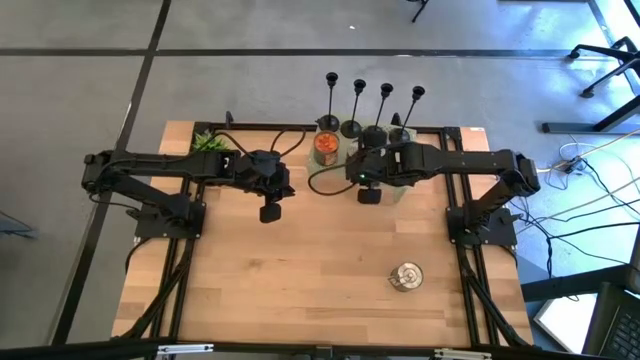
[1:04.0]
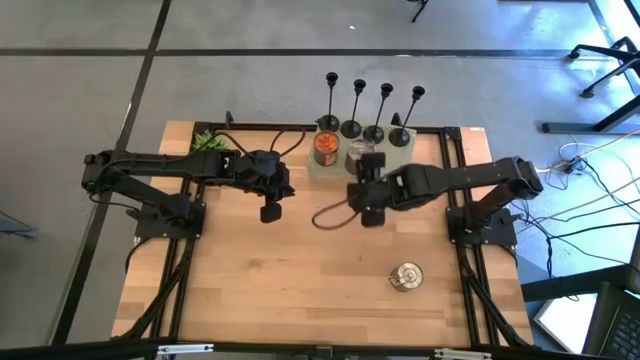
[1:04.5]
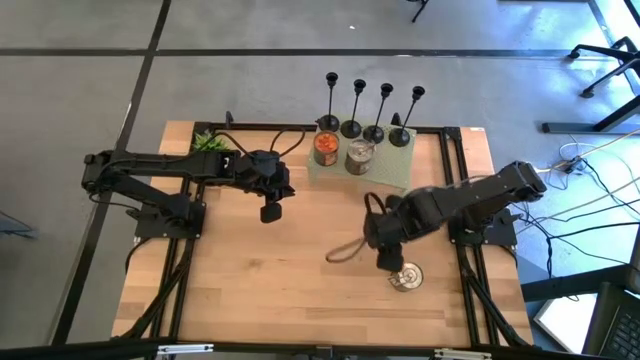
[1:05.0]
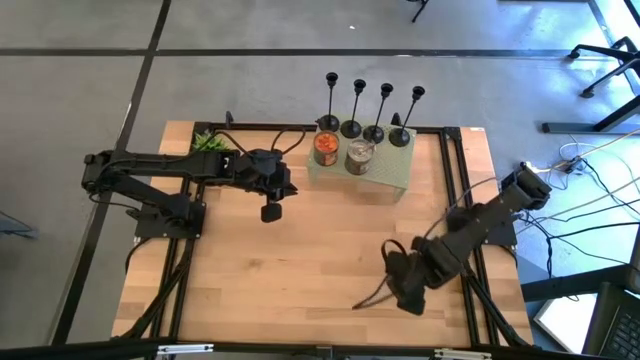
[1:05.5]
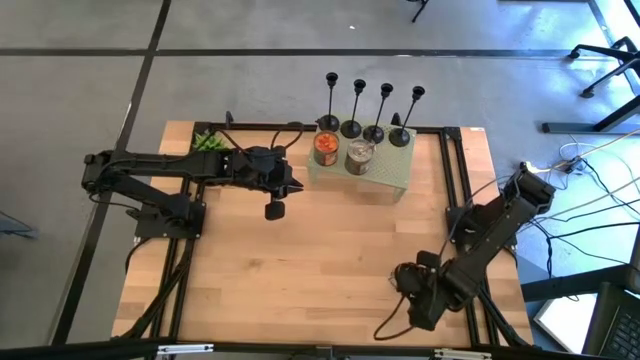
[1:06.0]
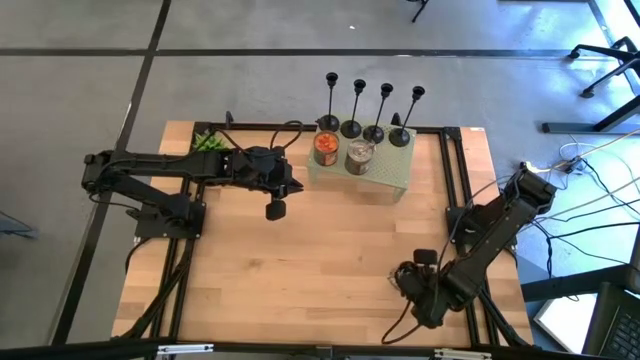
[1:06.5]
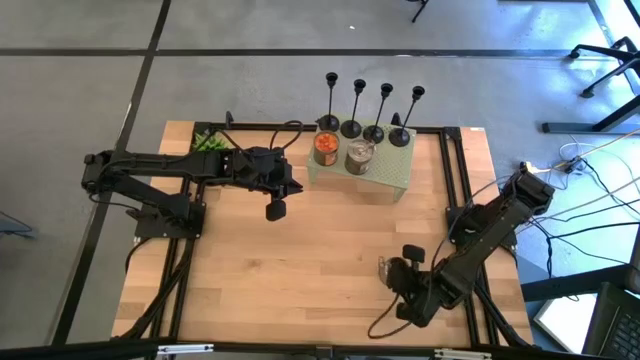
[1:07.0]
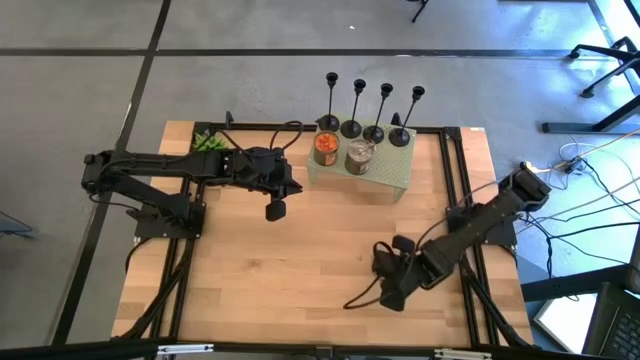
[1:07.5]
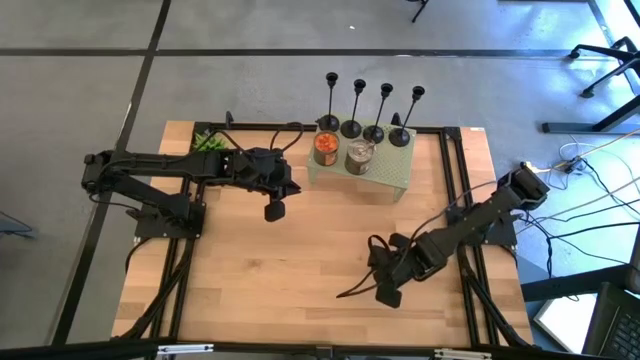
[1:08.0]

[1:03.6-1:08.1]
Task: Pick & Place candle stick holders
Put the silver scented candle on the shelf

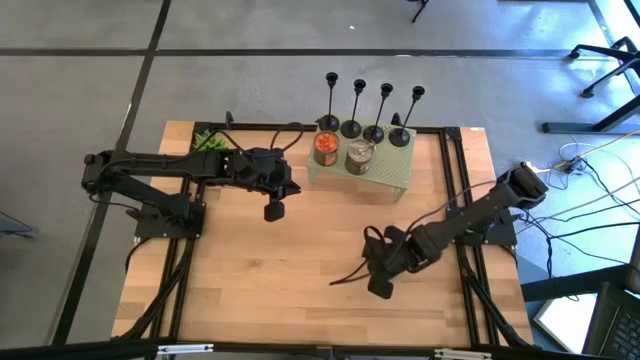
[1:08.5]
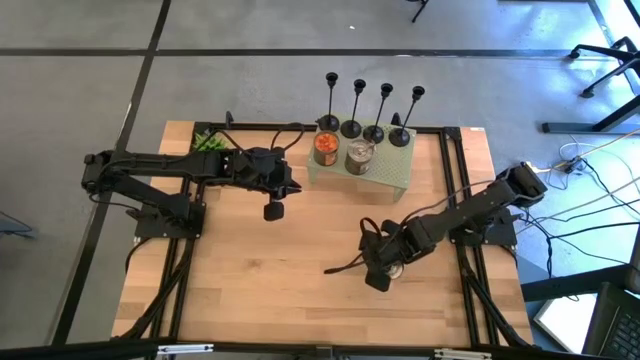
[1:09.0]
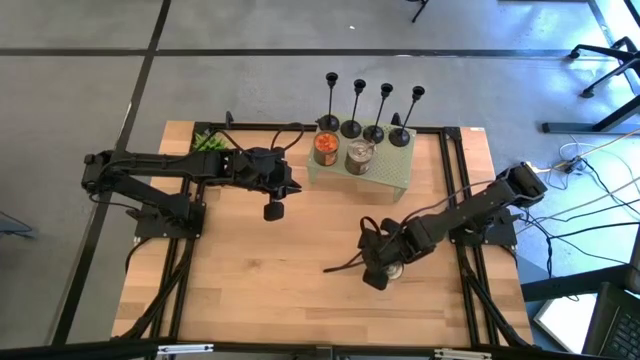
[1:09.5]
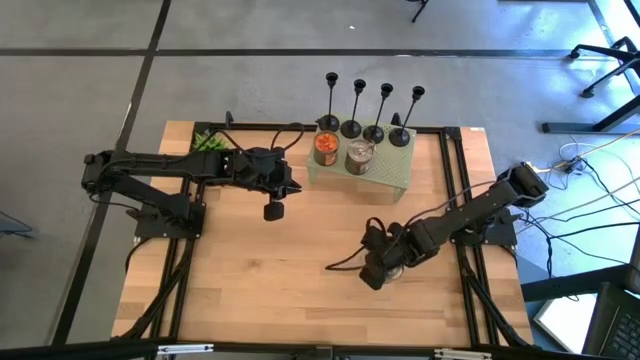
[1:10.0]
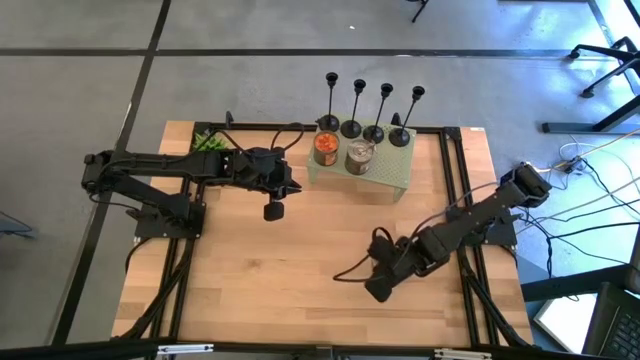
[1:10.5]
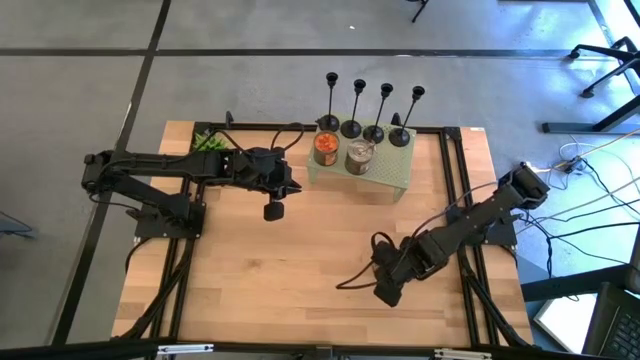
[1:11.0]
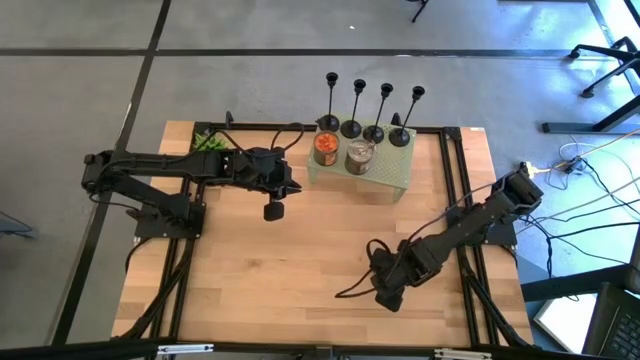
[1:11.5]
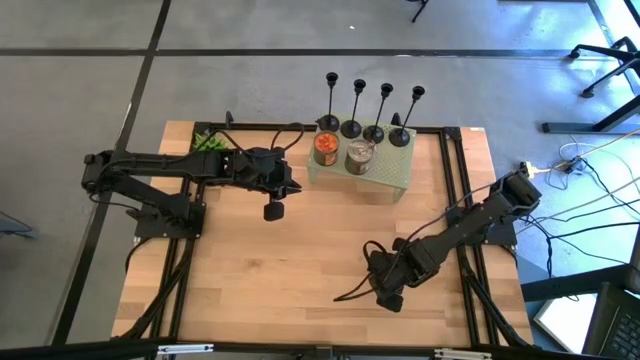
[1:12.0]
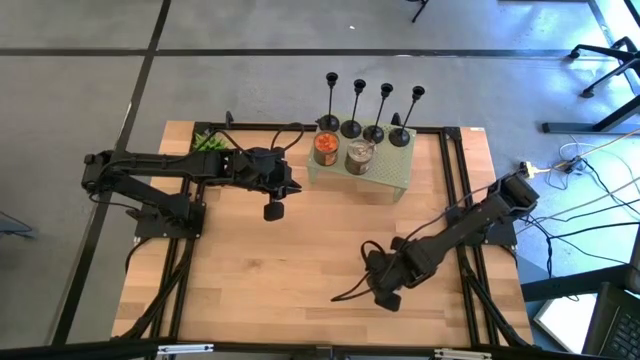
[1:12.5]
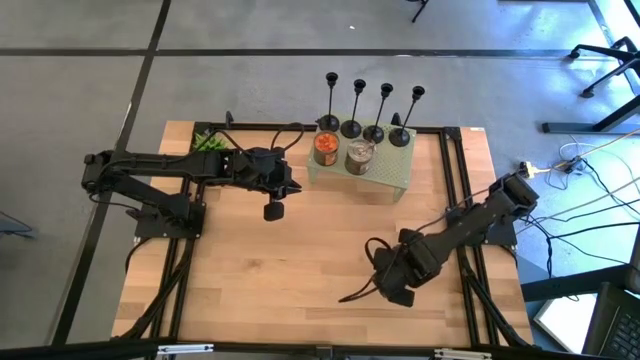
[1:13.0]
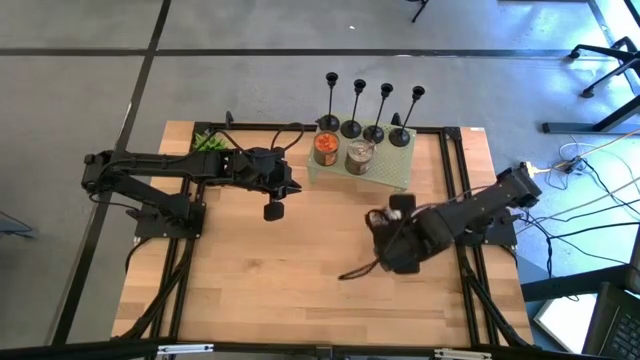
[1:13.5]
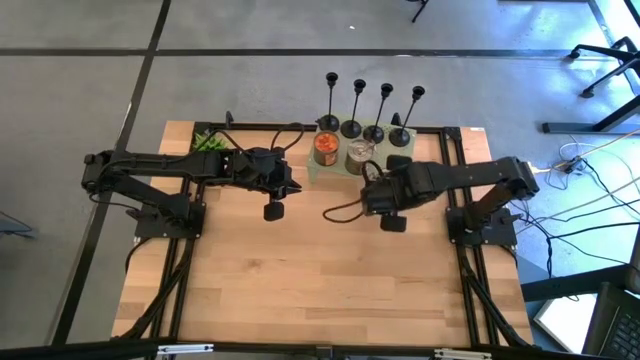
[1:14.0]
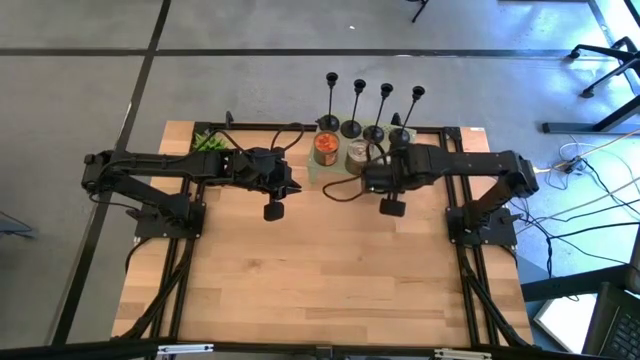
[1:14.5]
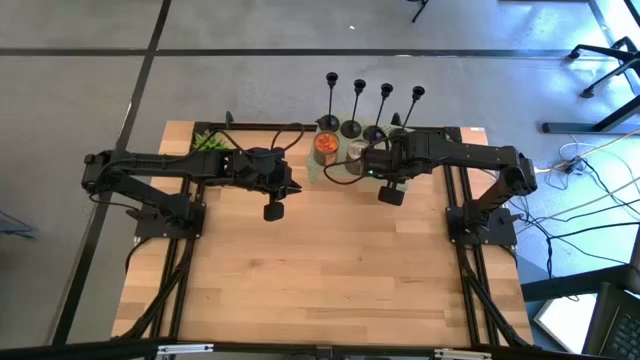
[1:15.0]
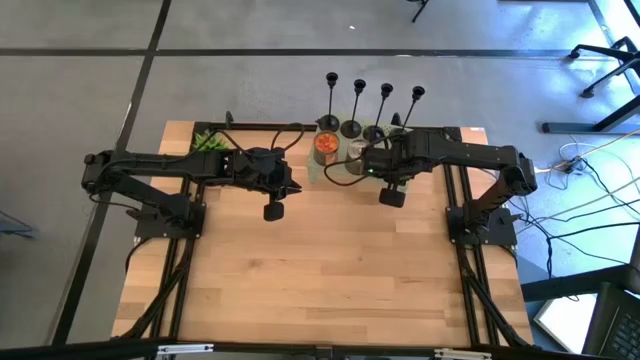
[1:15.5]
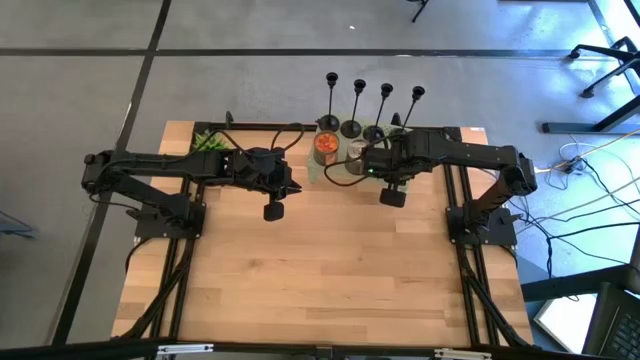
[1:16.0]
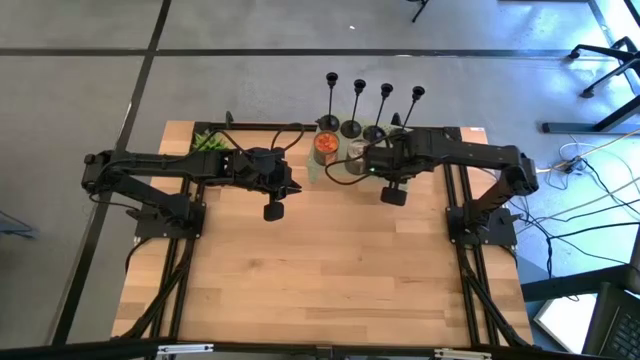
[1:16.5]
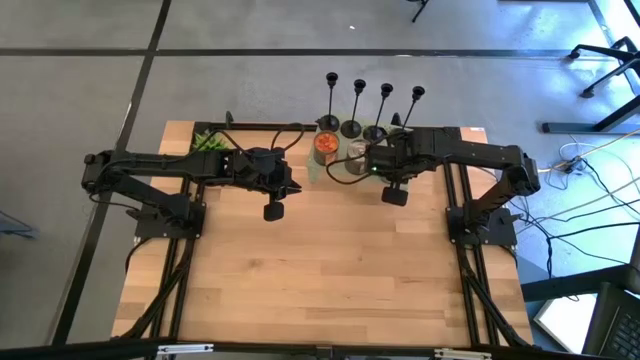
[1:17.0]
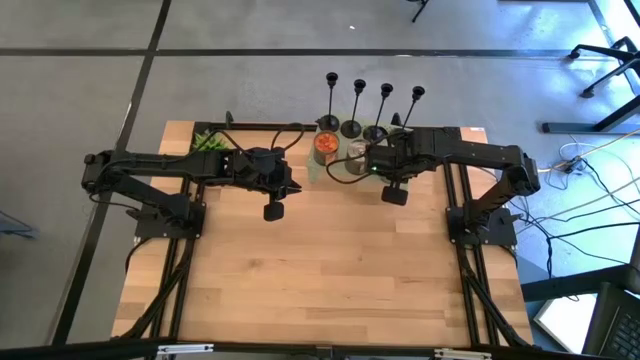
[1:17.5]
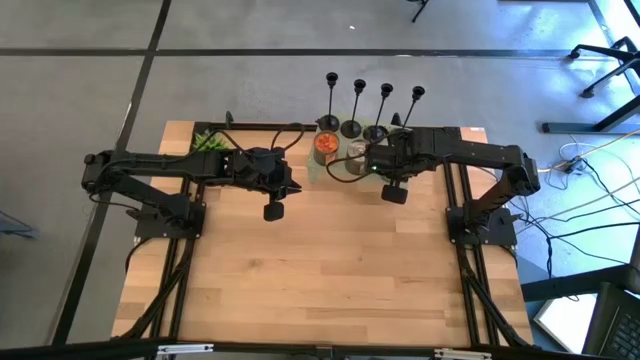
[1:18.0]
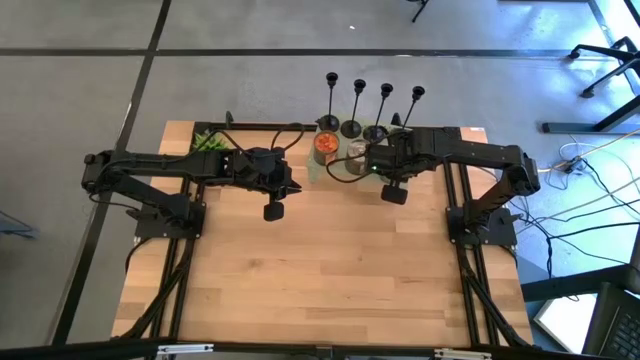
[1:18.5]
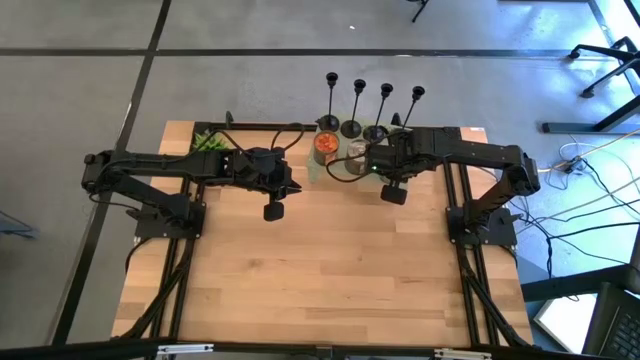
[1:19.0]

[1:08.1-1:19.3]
Put the silver scented candle on the shelf

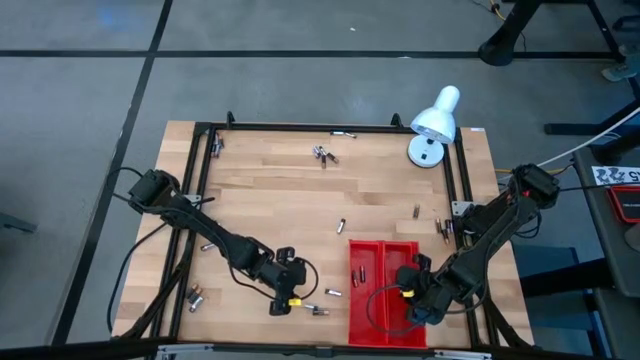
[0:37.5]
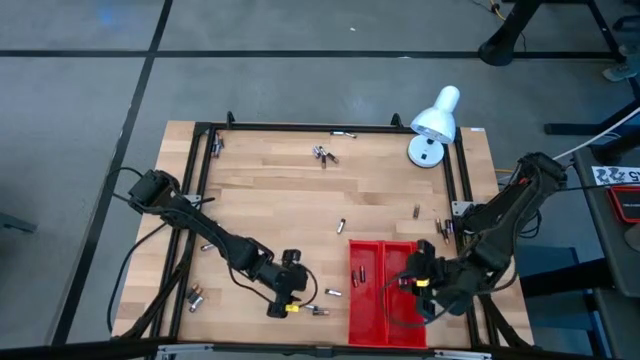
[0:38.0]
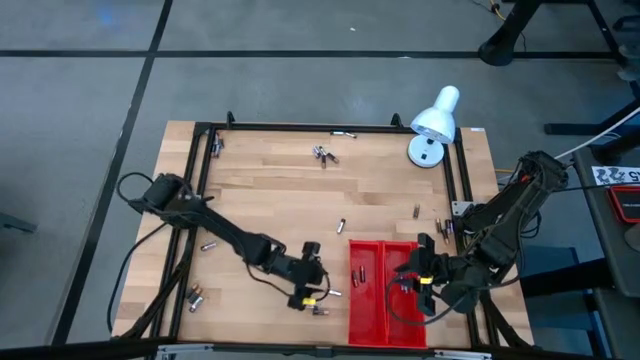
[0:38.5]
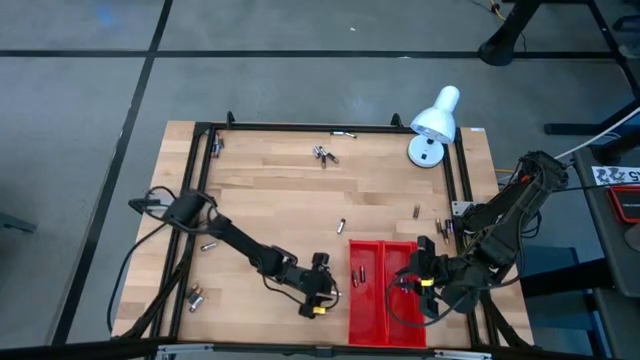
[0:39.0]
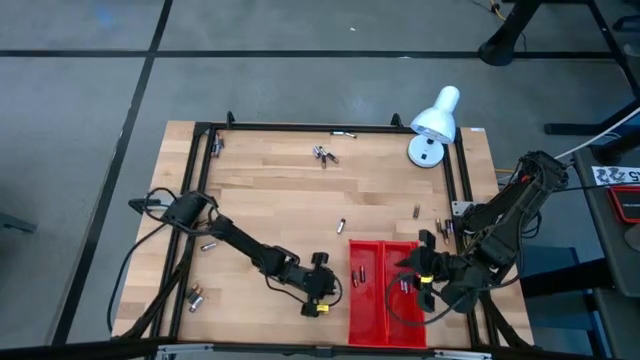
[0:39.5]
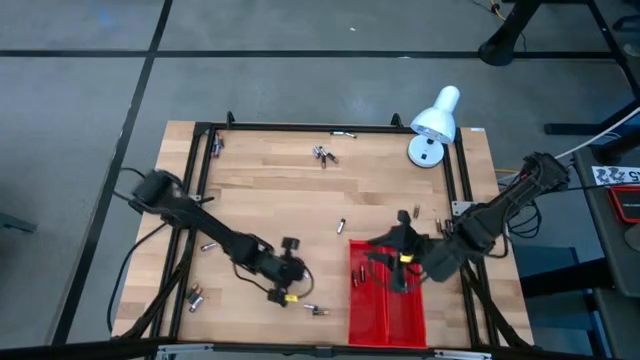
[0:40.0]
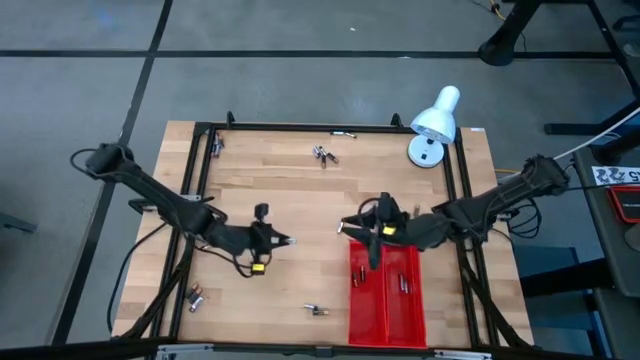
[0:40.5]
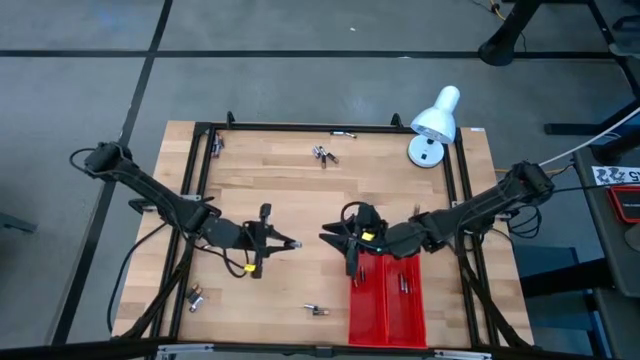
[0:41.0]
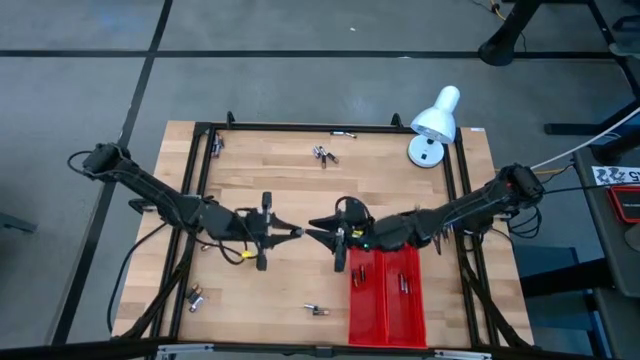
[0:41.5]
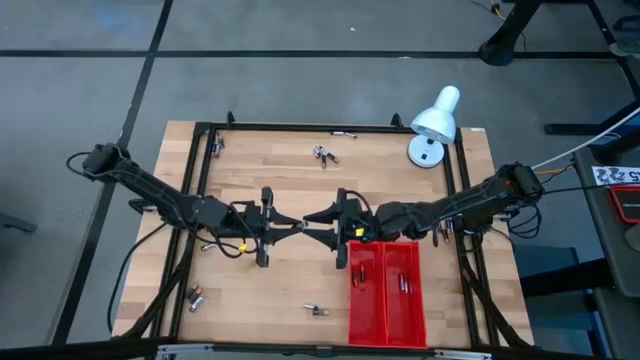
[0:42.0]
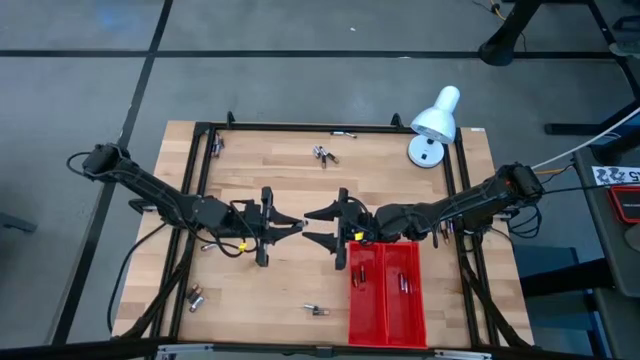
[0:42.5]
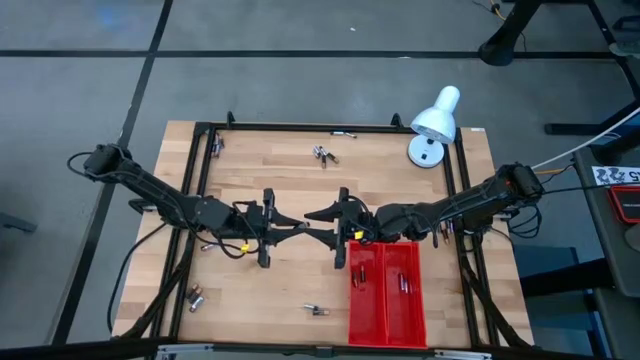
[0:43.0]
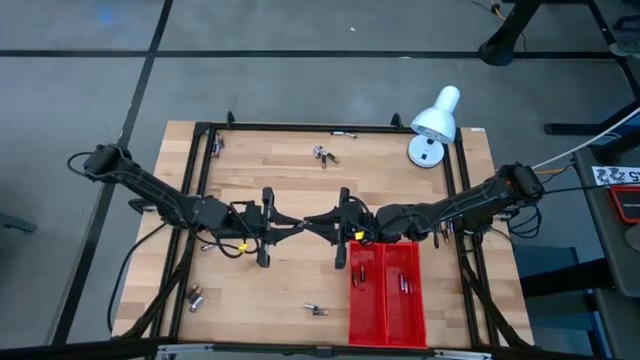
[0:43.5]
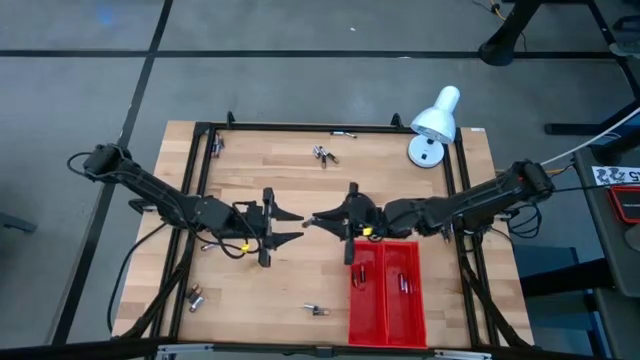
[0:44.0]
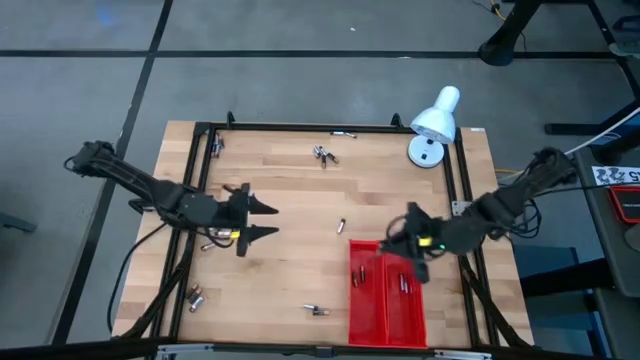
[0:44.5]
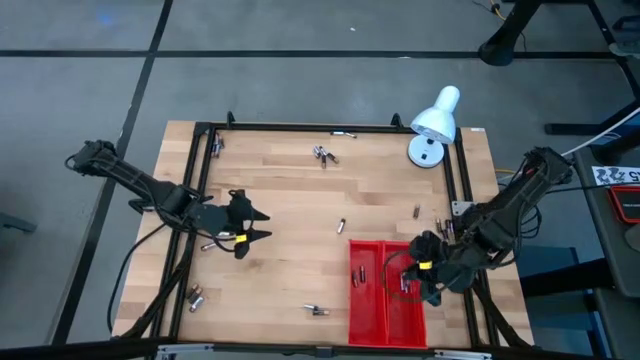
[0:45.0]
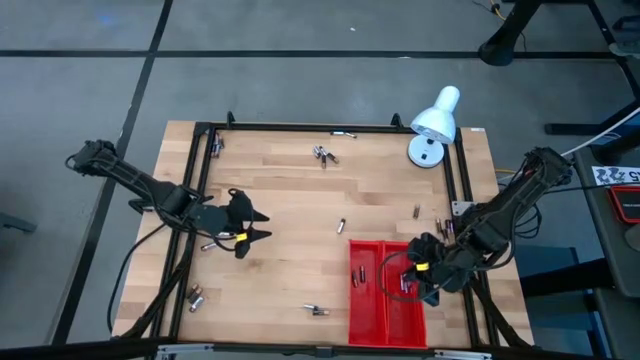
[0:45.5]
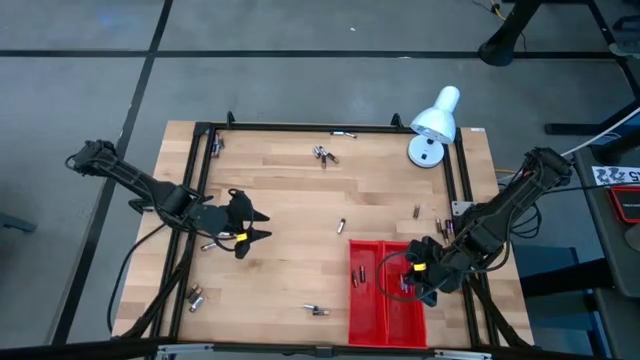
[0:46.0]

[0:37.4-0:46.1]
Task: Sort batteries
Put the silver battery into the right red bin
